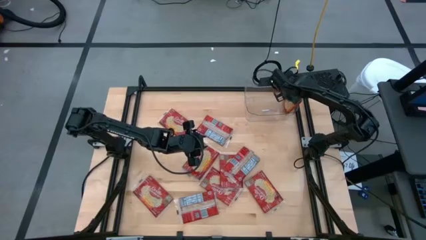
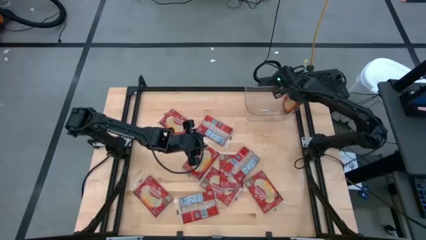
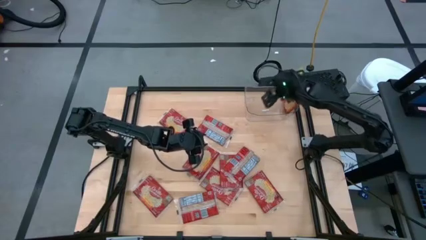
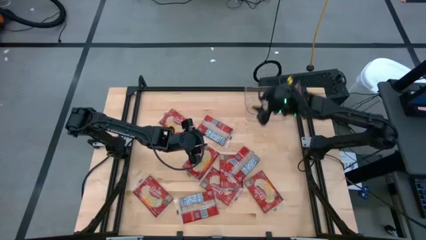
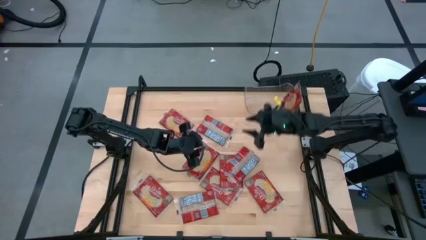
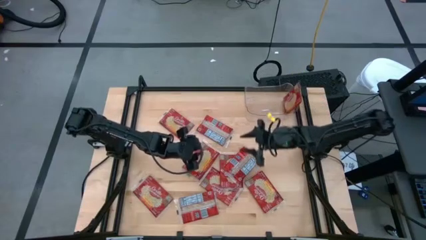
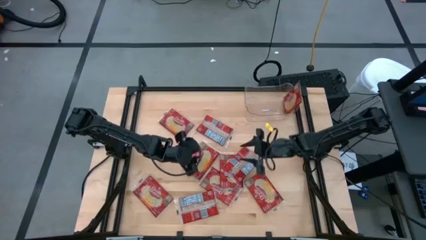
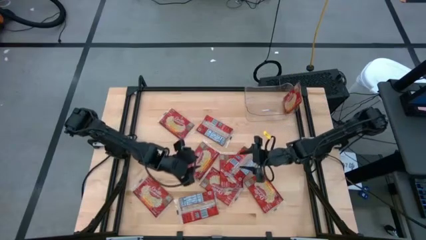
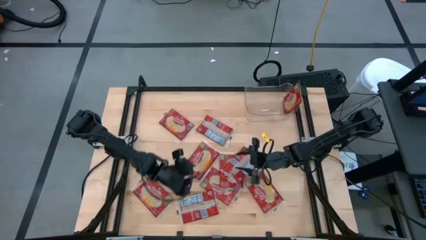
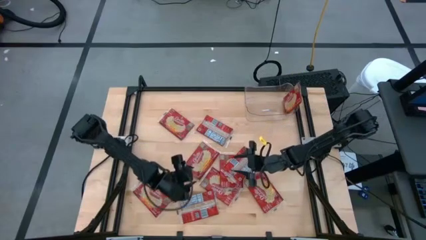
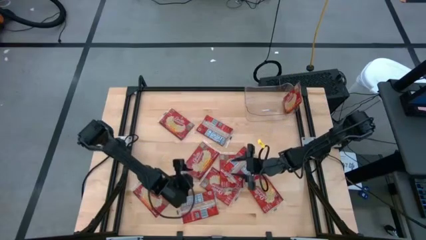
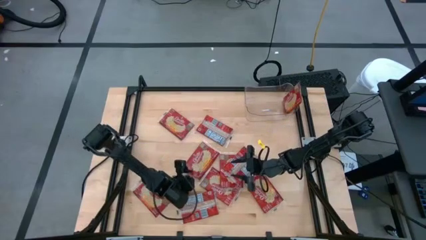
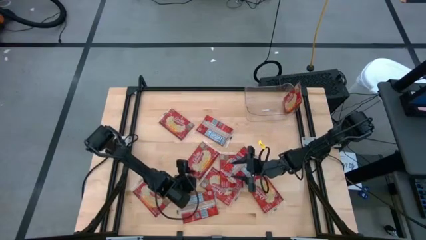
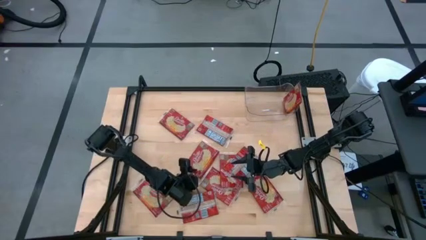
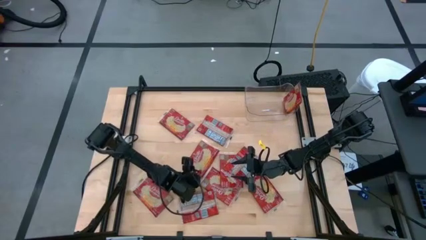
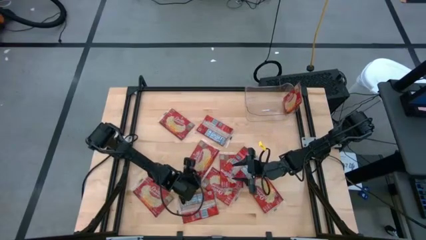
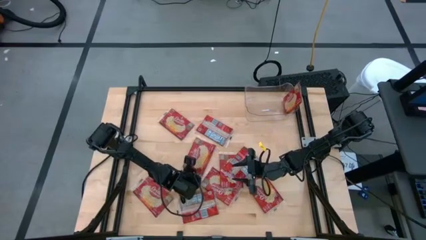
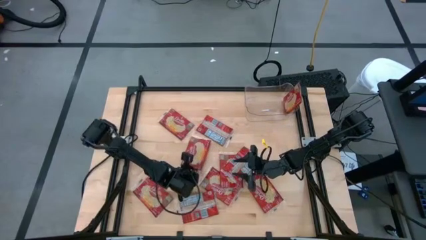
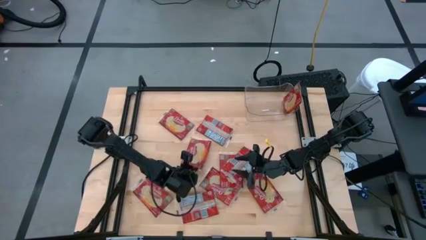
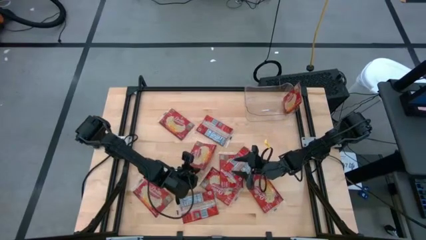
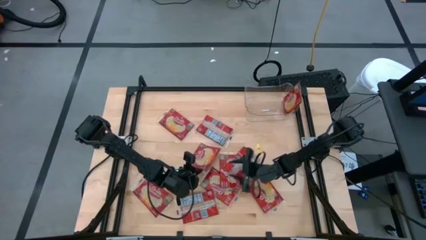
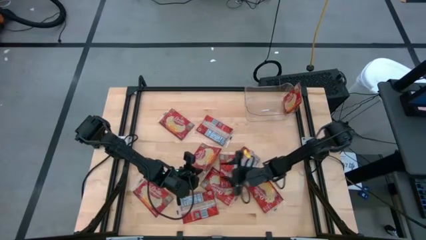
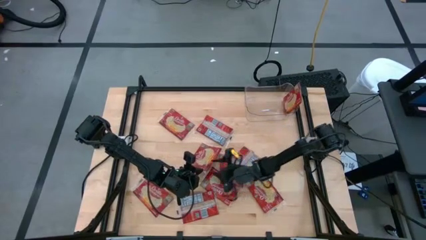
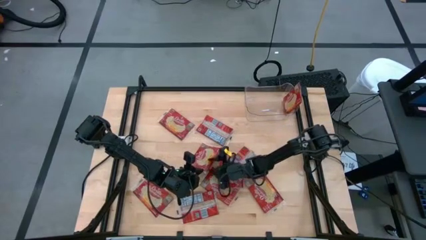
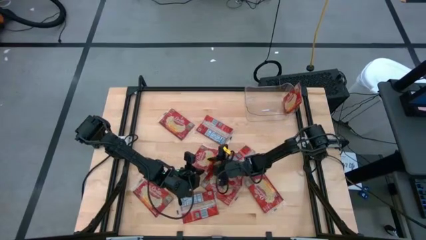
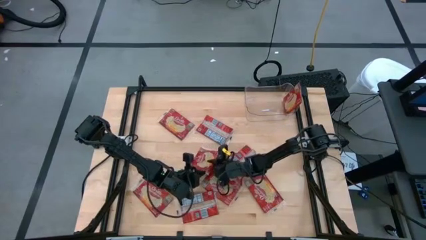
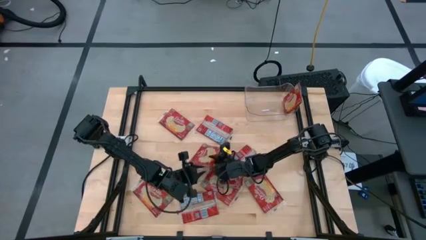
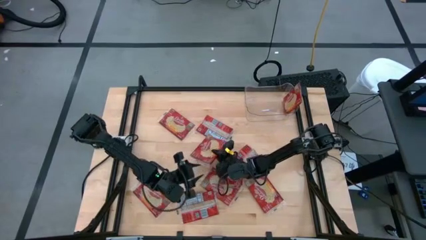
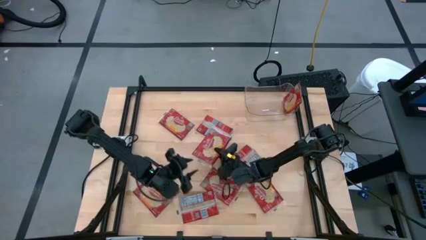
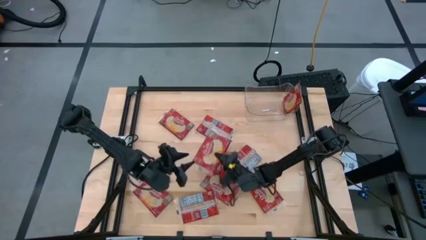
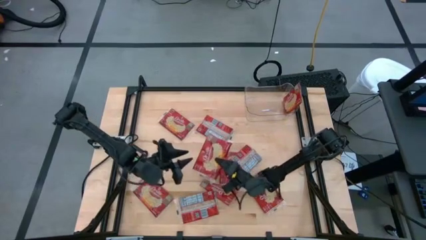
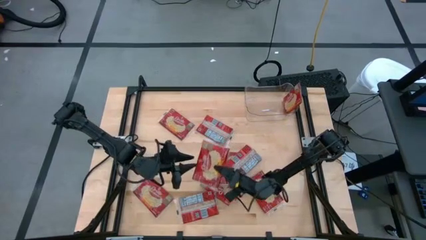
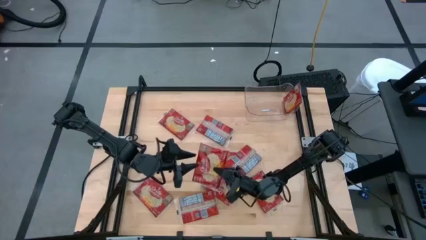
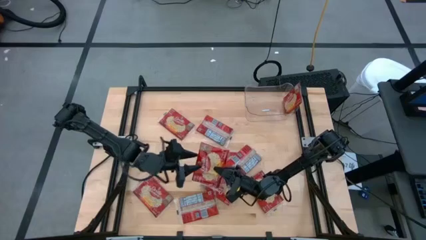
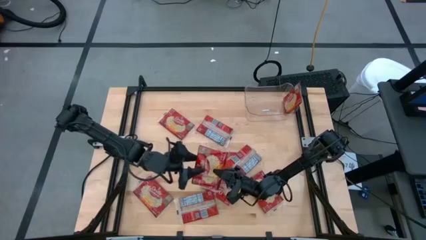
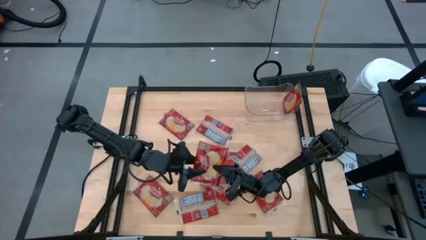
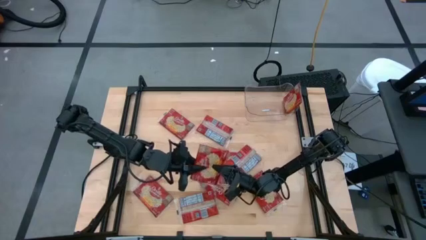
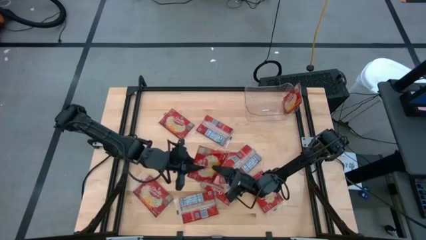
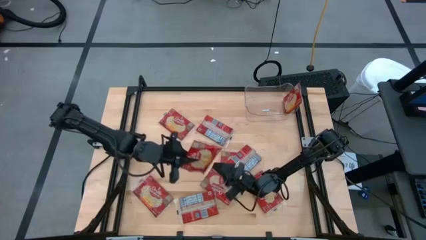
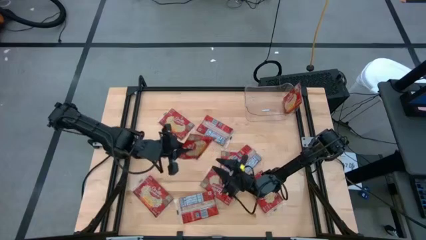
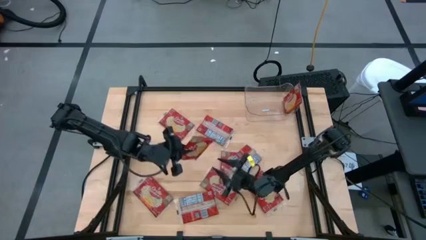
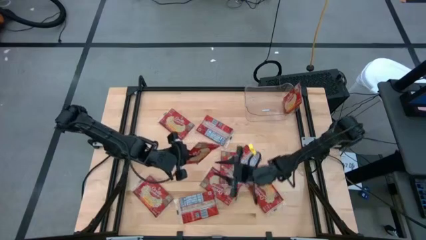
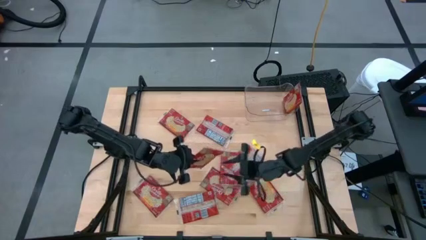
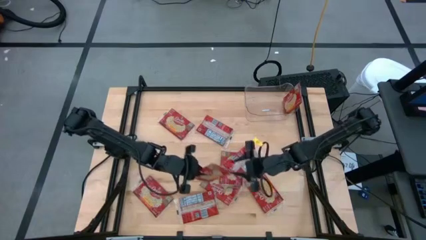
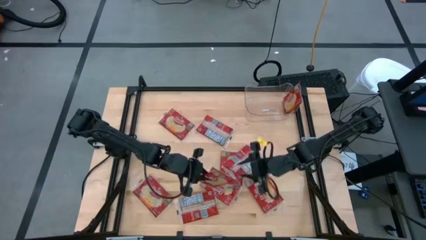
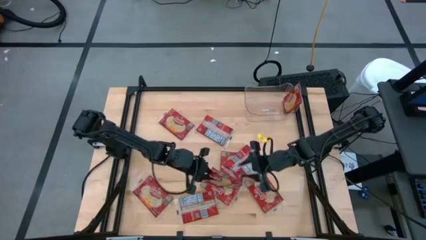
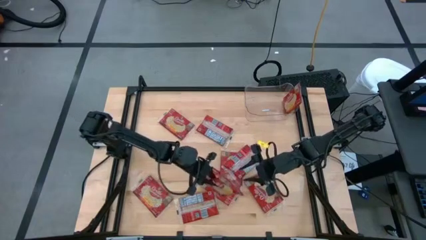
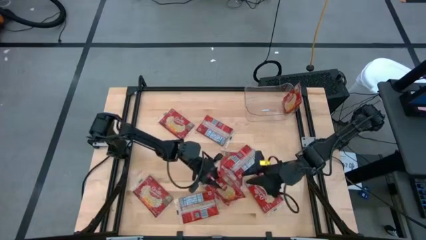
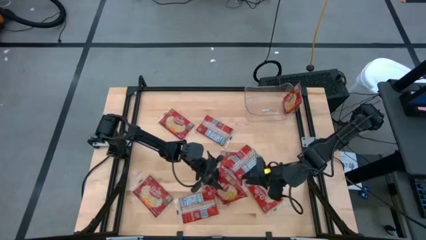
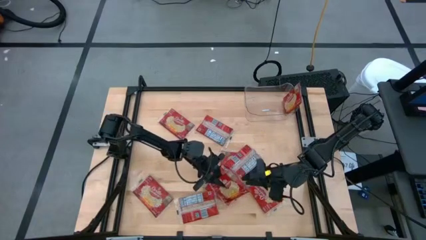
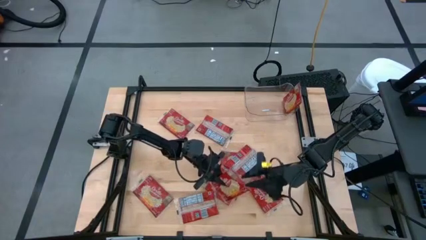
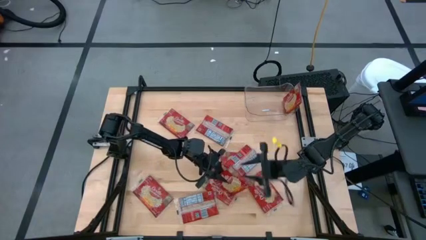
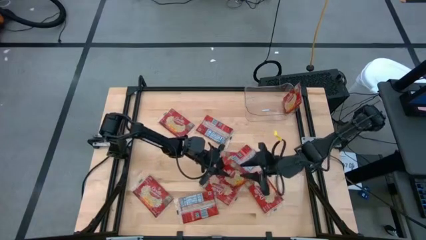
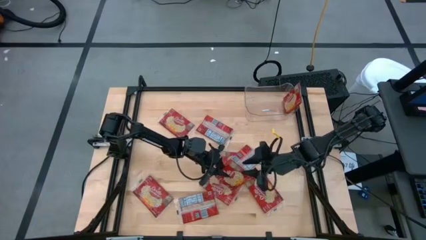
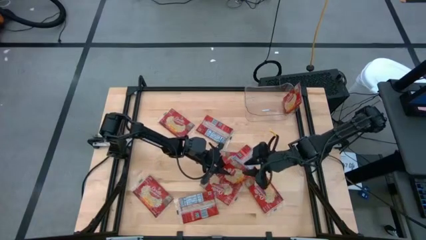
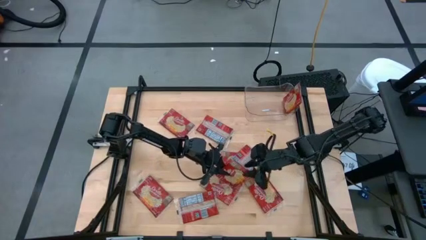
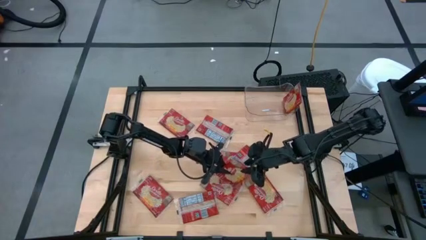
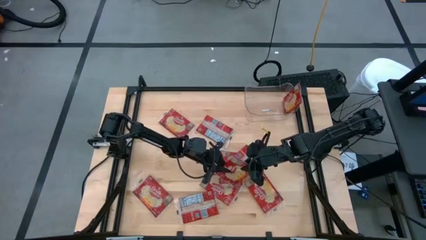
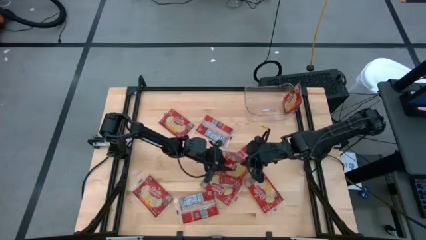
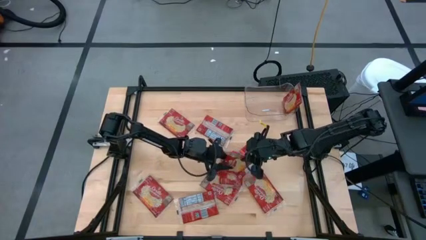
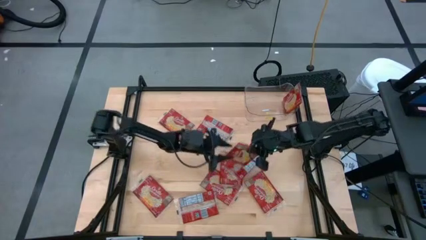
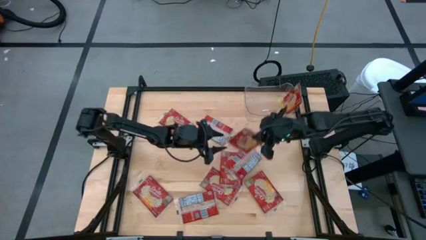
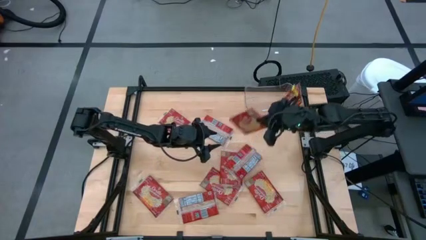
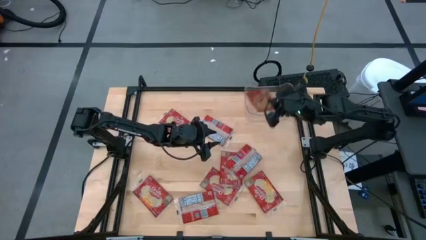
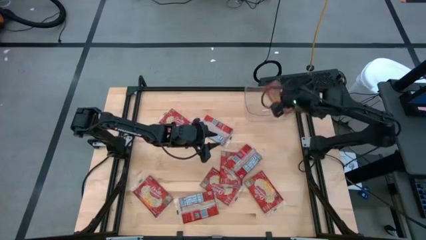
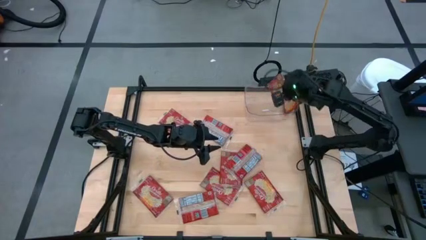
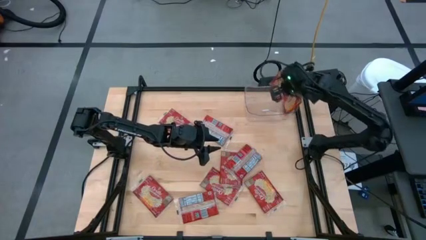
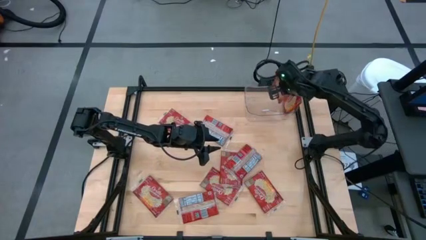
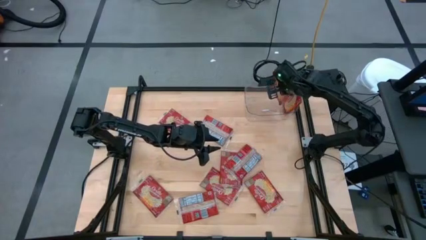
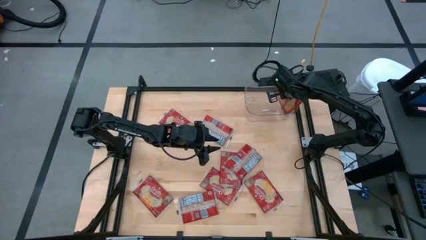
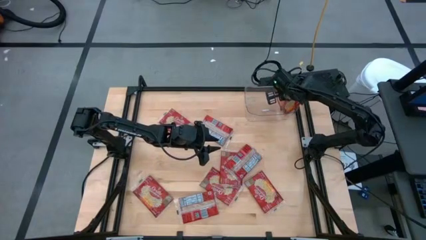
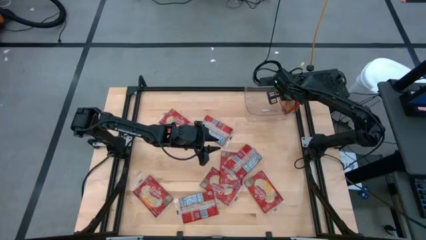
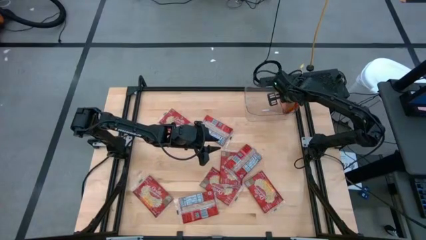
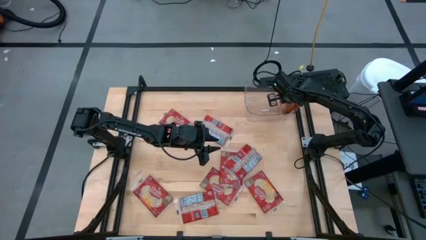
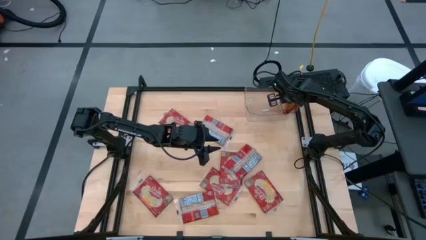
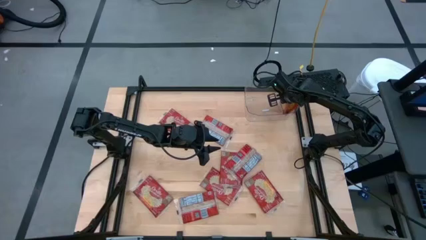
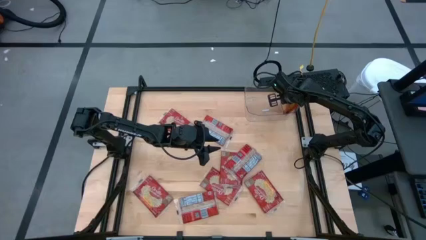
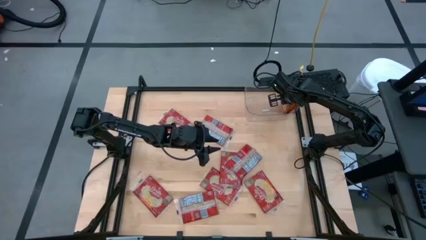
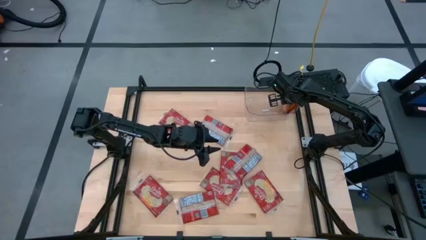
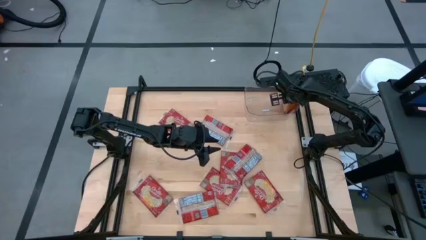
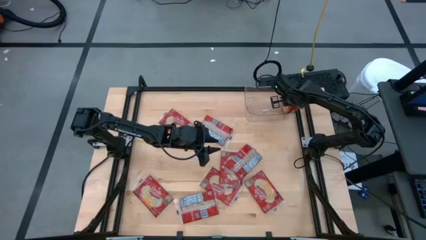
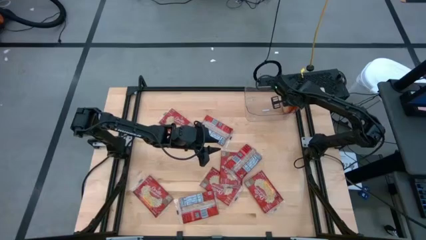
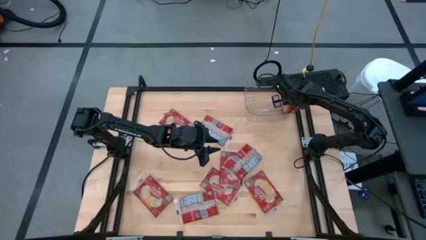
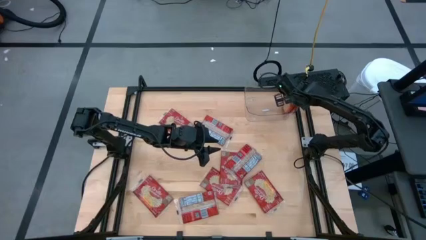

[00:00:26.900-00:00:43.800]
Task: Sort popcorn bags into baskets
Put the red popcorn bag into the transparent bin
